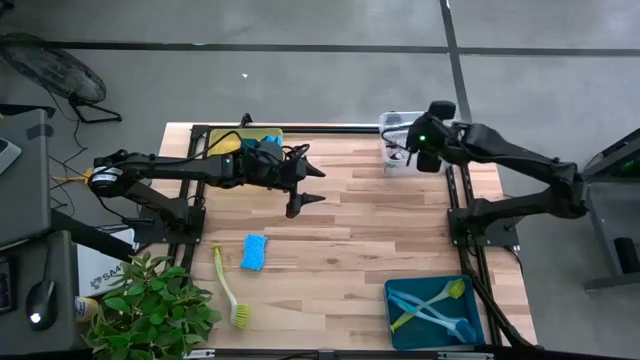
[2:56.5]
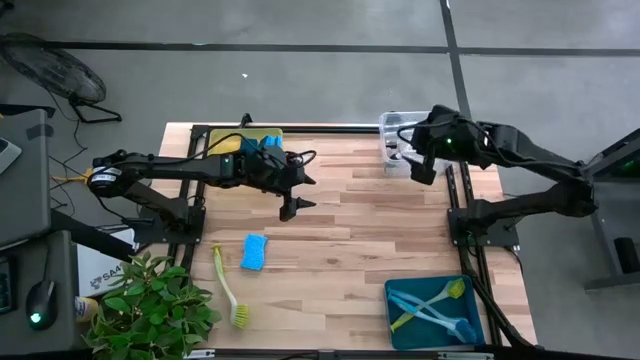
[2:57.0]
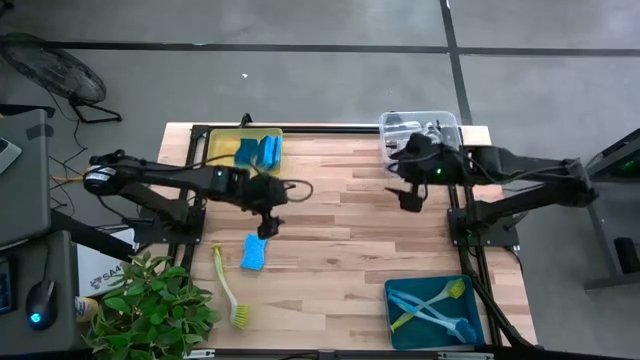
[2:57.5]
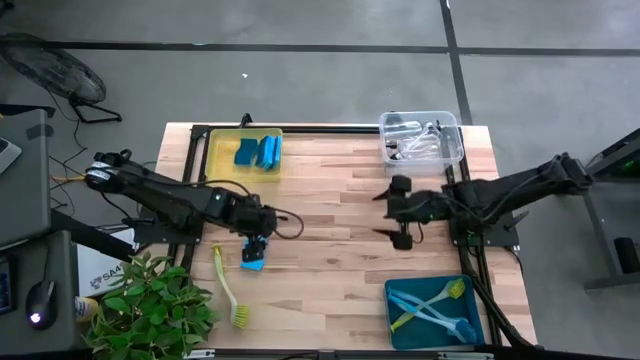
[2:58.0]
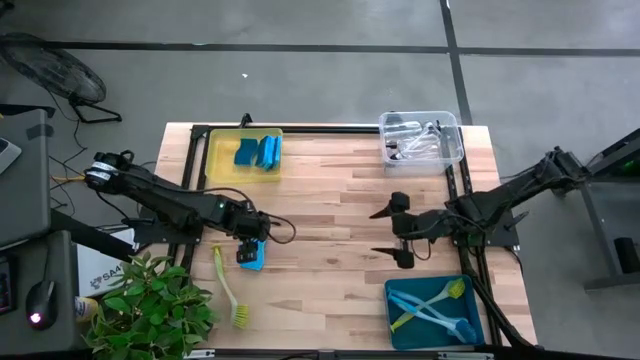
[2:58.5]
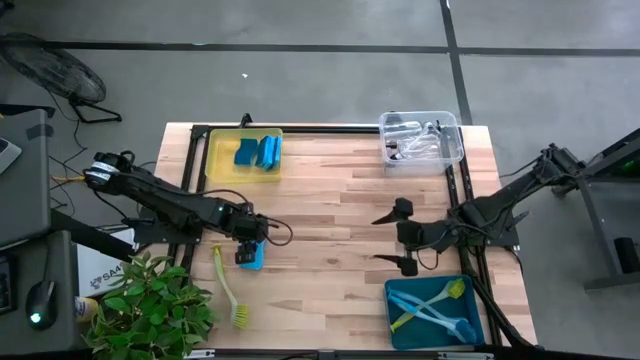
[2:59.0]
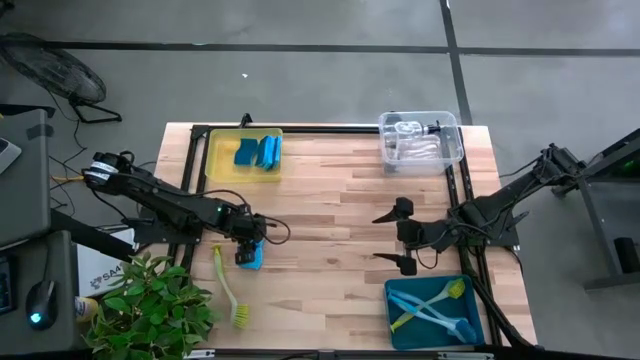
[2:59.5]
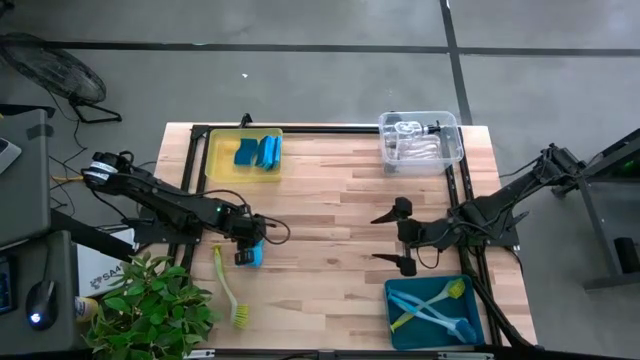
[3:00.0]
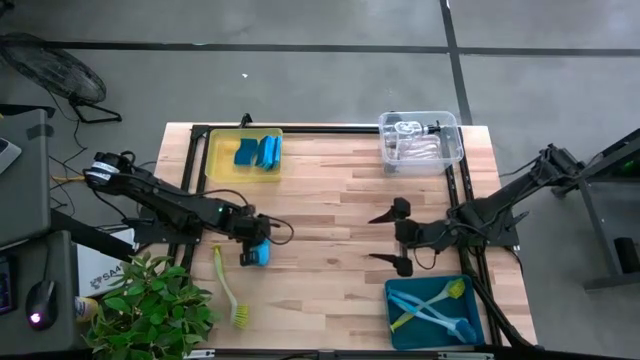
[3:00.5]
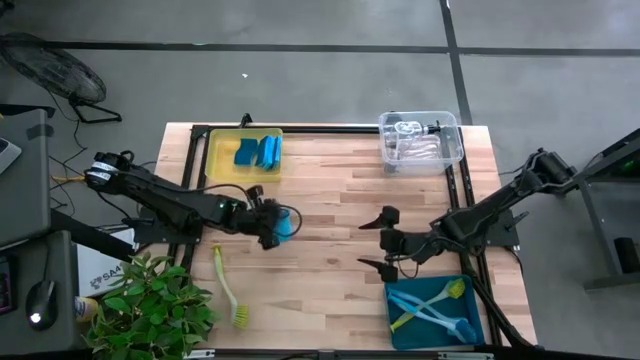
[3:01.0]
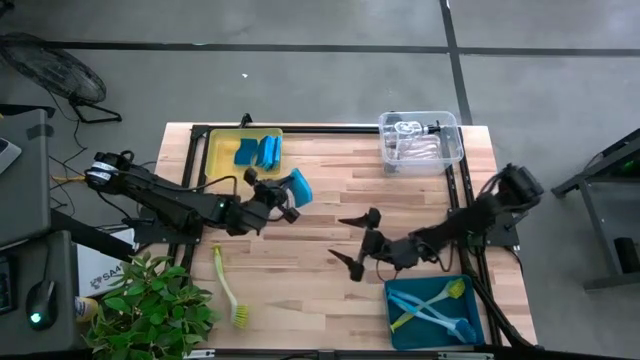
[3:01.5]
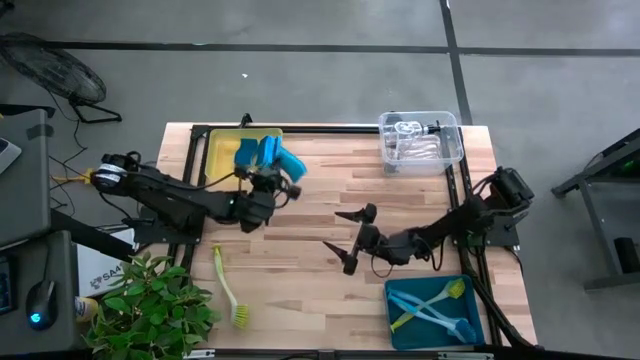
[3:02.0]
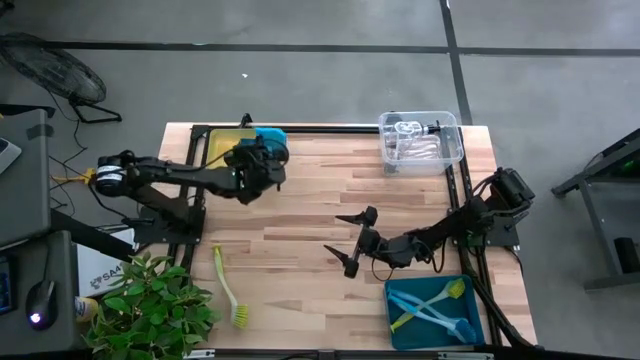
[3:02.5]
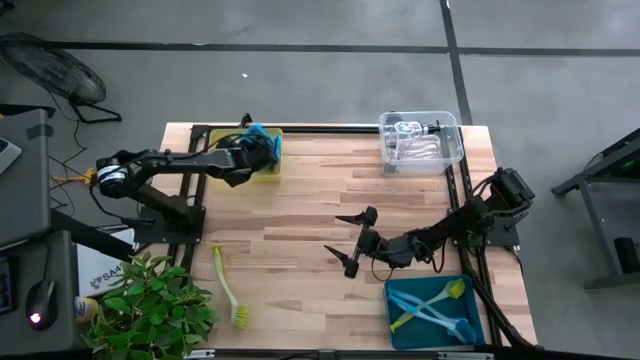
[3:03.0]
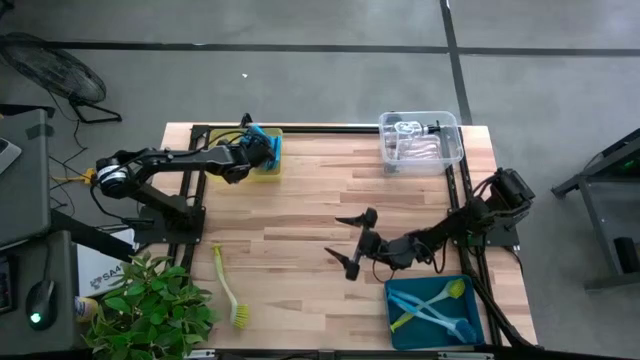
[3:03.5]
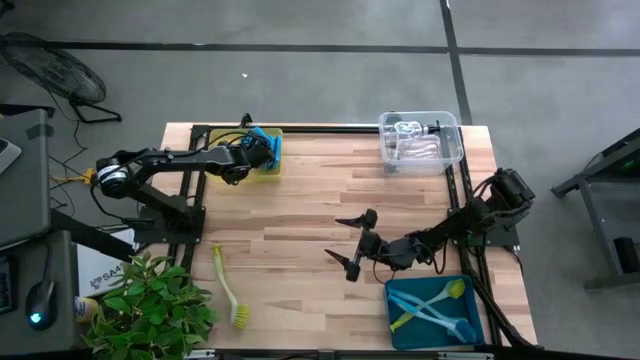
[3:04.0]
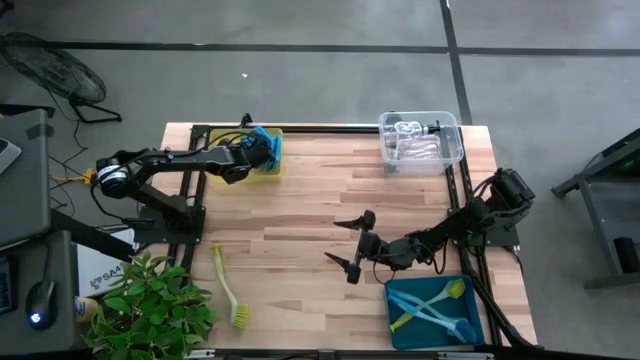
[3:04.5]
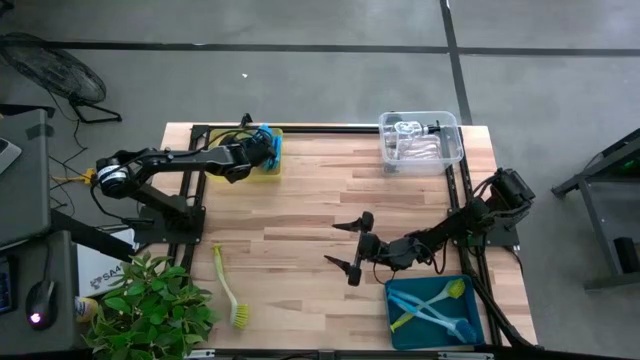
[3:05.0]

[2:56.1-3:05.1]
Task: Pick & Place Kitchen Sink Supplies
Put the blue sponge into the yellow bin

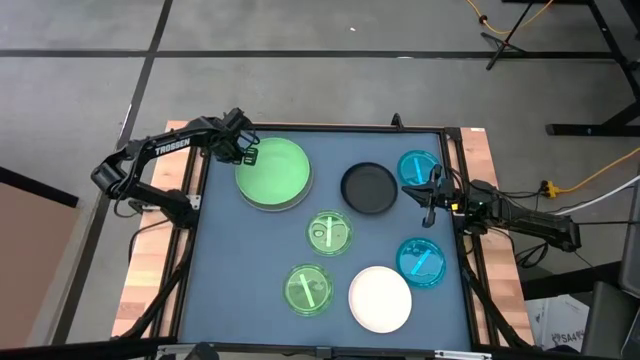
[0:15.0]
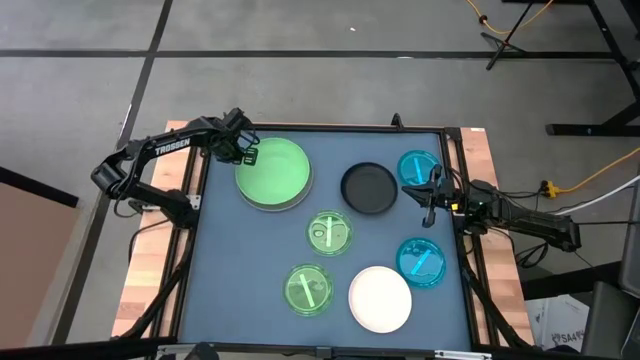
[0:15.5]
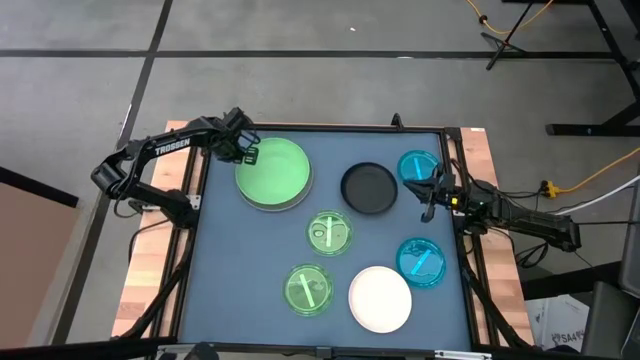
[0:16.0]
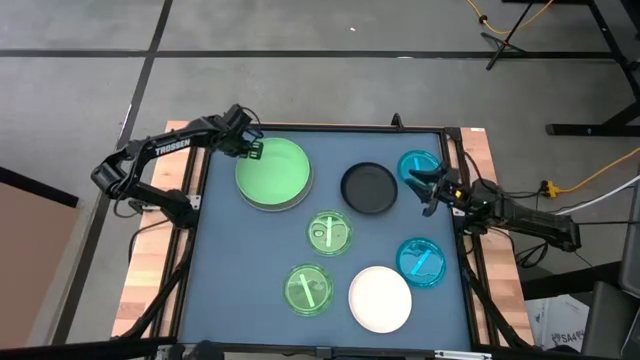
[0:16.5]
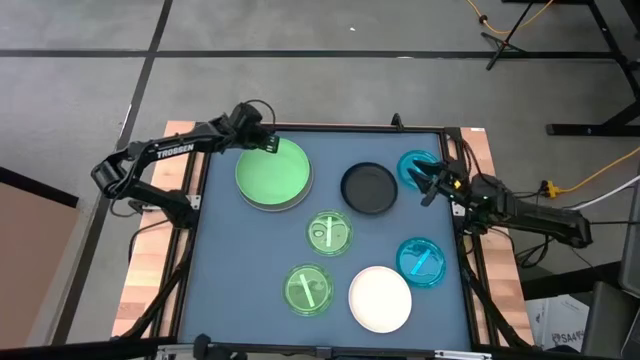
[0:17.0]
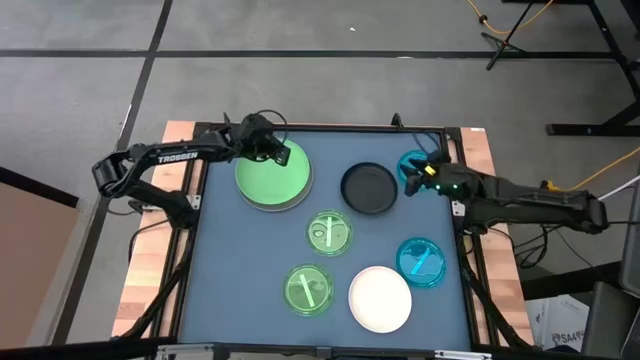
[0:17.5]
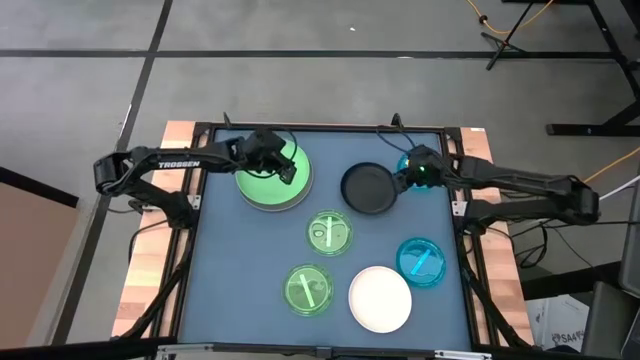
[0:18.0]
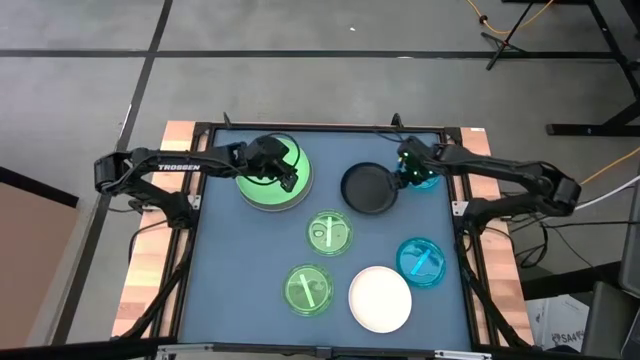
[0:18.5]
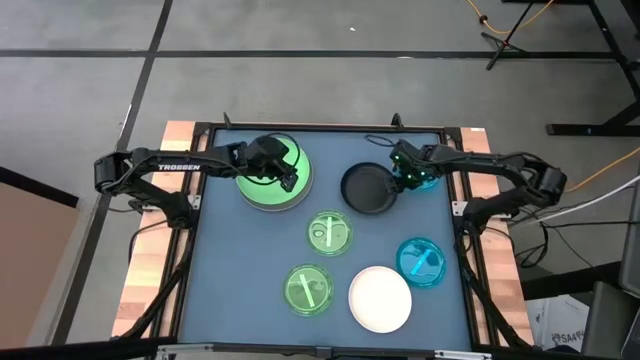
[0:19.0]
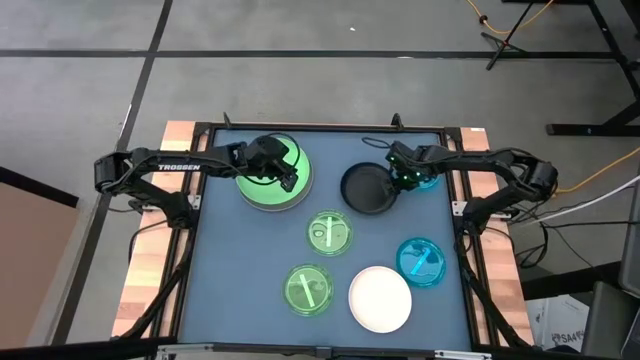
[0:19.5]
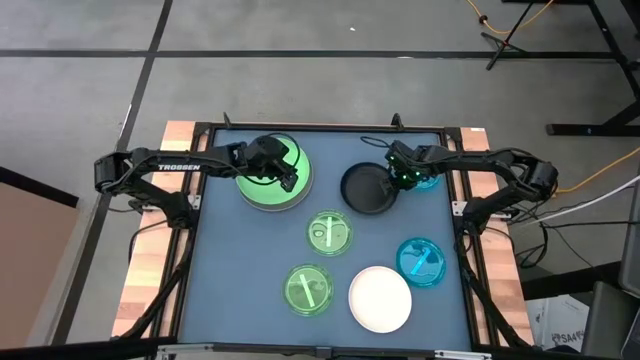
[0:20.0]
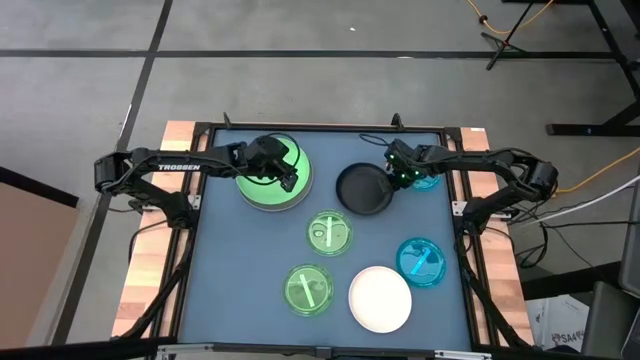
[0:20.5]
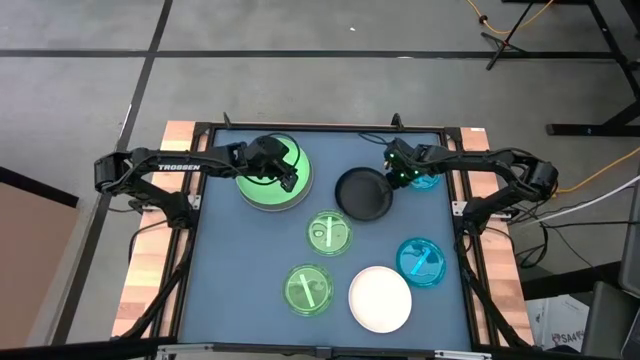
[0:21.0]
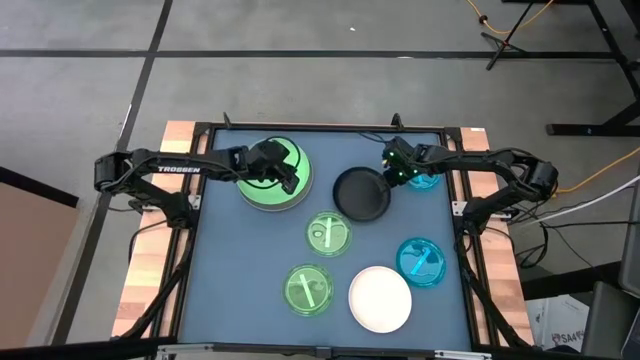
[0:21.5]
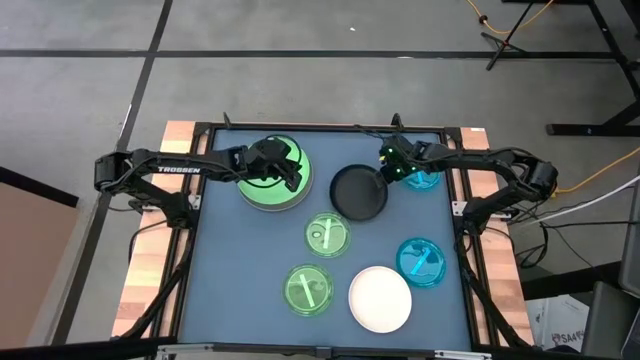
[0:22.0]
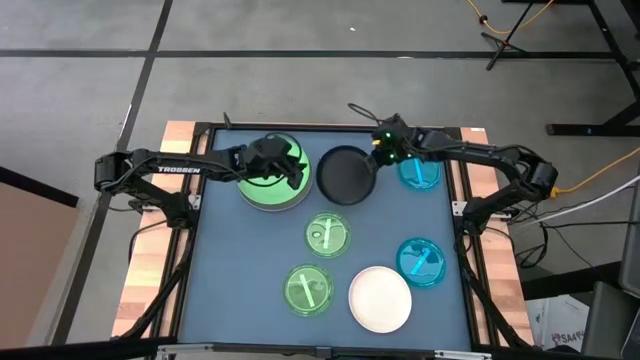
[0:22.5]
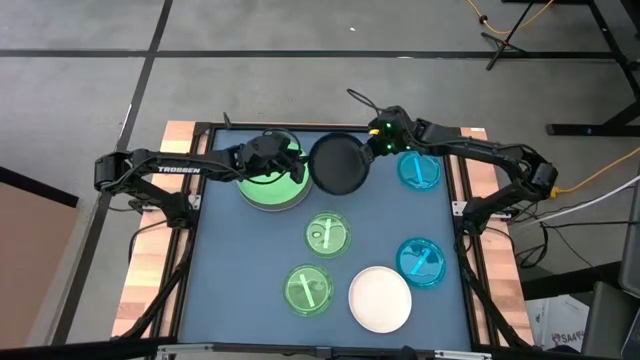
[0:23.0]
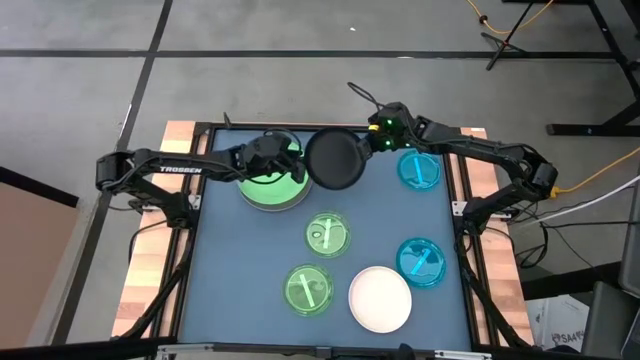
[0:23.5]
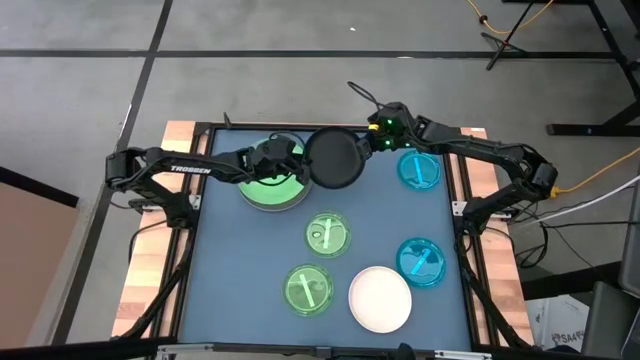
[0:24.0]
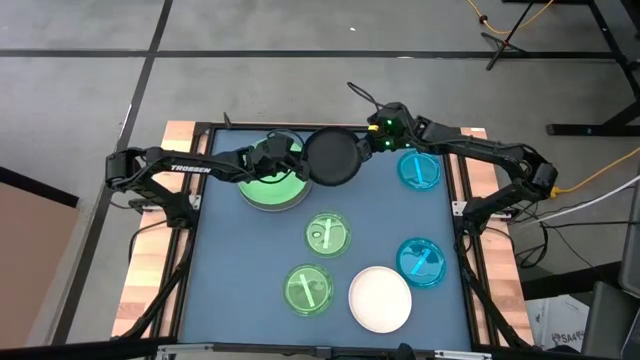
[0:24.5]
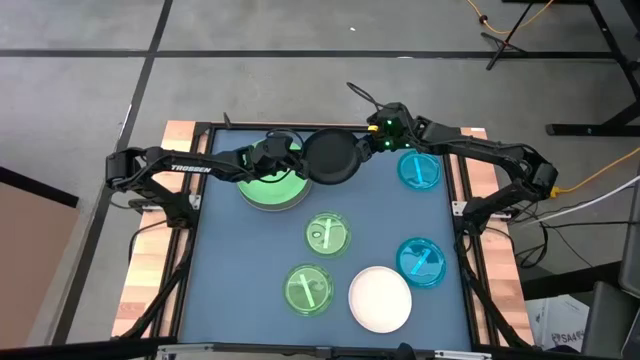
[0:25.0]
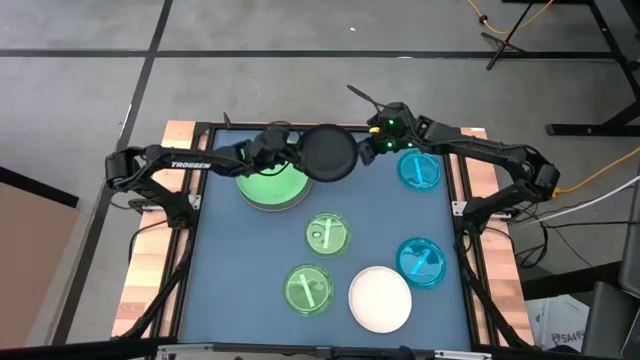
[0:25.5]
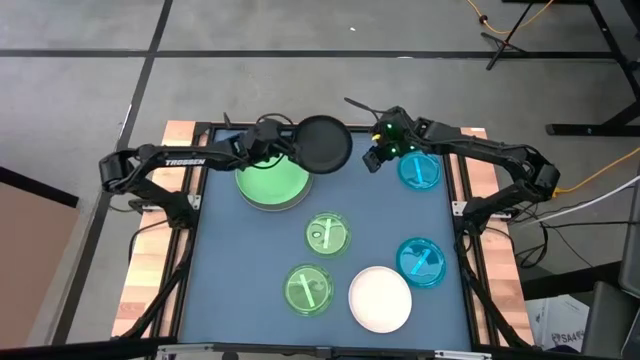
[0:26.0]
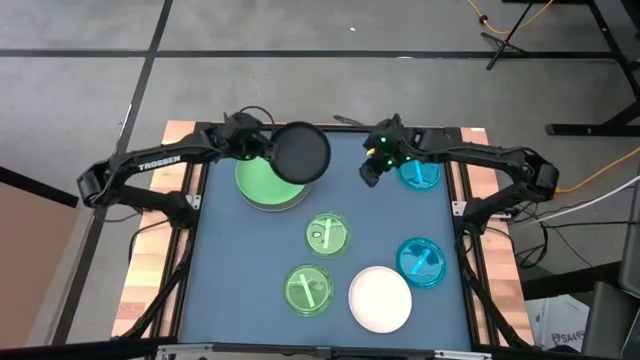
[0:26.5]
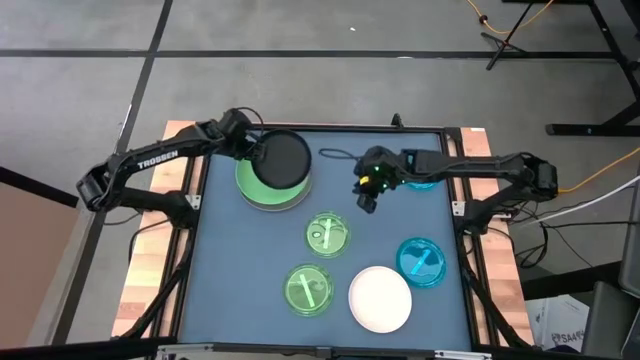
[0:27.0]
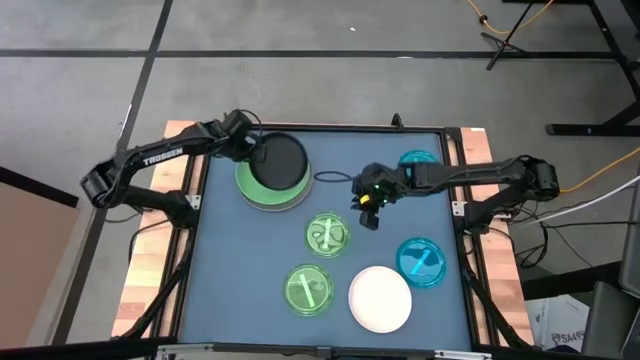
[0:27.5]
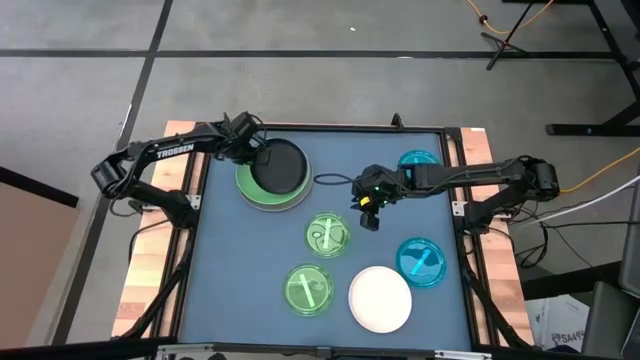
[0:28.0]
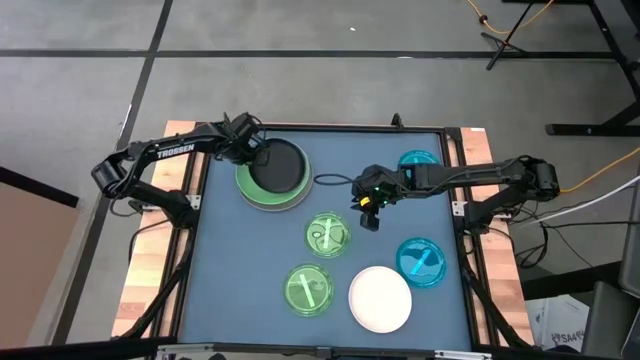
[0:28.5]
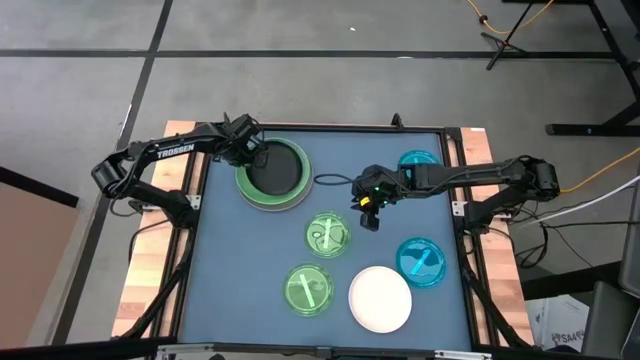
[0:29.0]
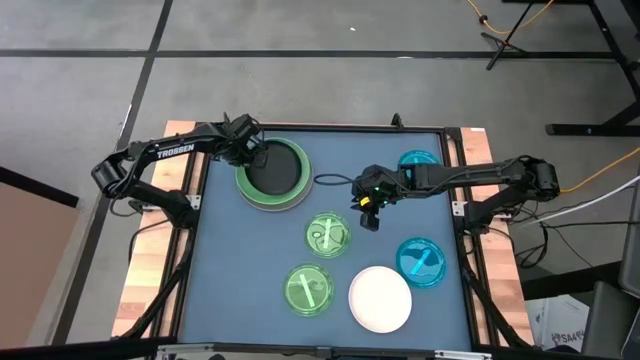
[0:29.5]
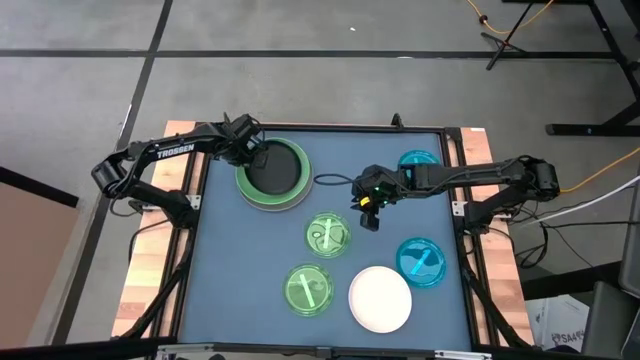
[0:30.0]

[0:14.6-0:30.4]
Task: Stack plastic plates
Stack the black plate on top of the green plate
